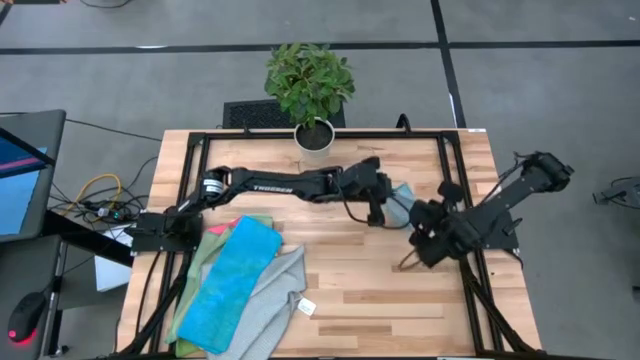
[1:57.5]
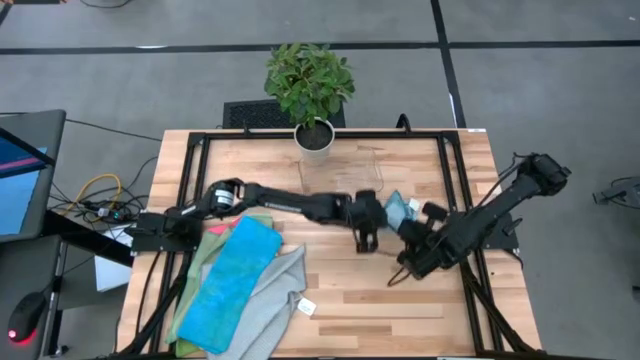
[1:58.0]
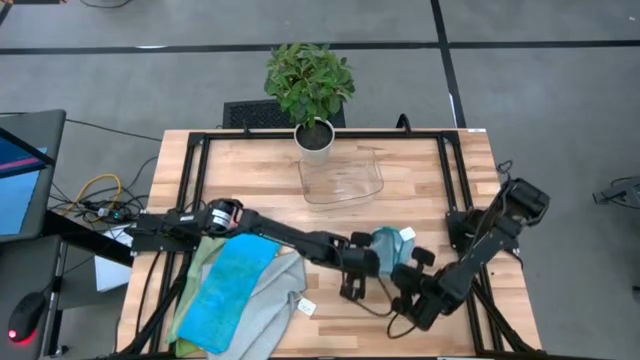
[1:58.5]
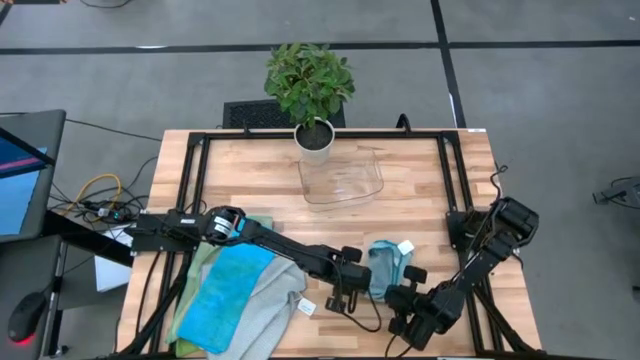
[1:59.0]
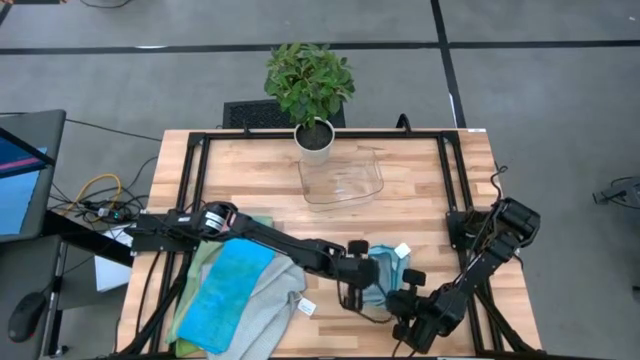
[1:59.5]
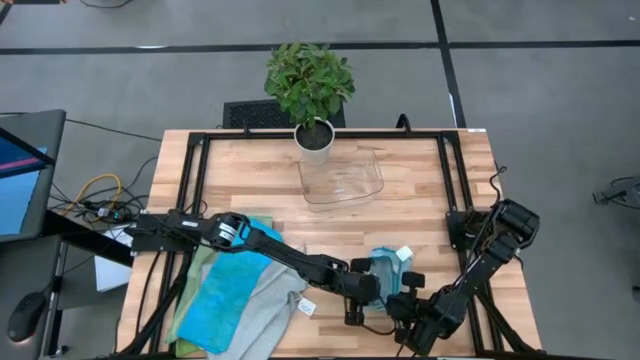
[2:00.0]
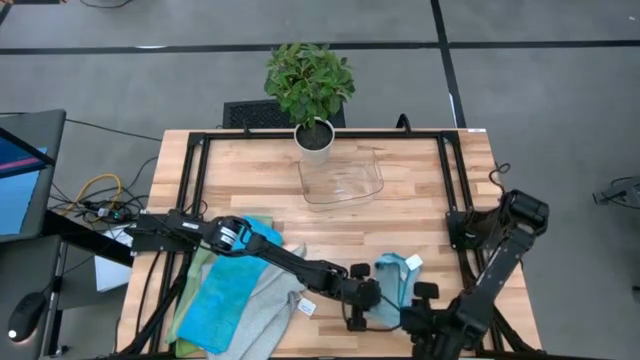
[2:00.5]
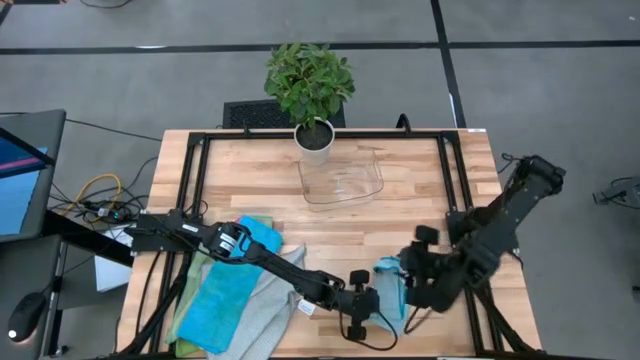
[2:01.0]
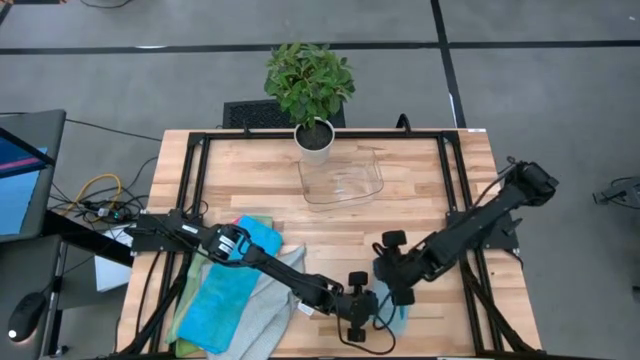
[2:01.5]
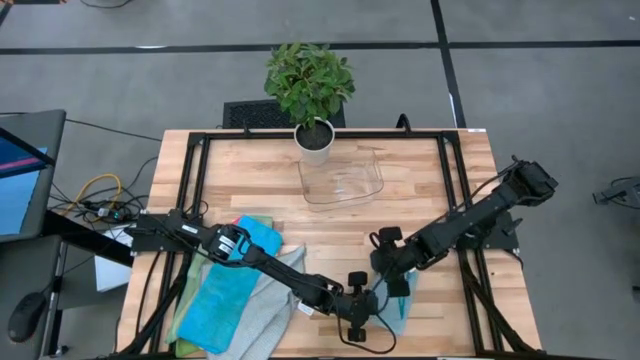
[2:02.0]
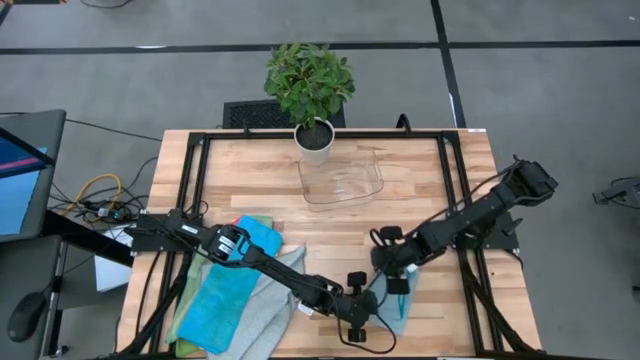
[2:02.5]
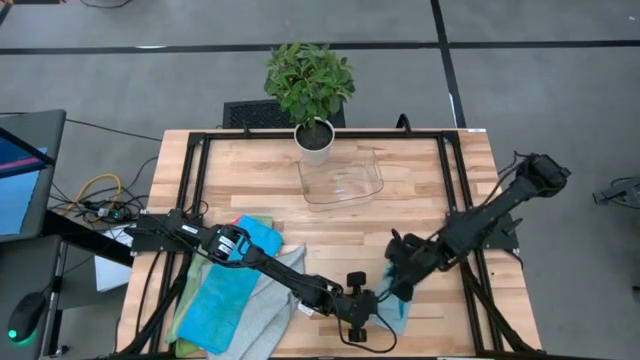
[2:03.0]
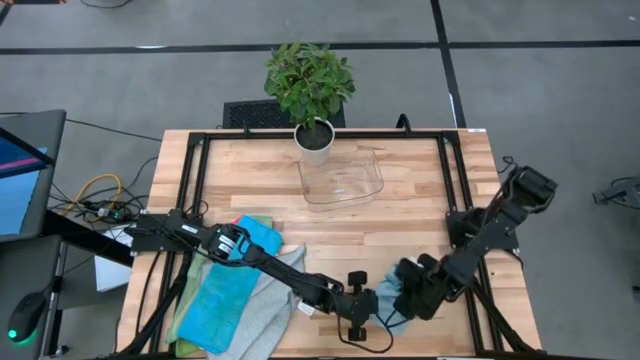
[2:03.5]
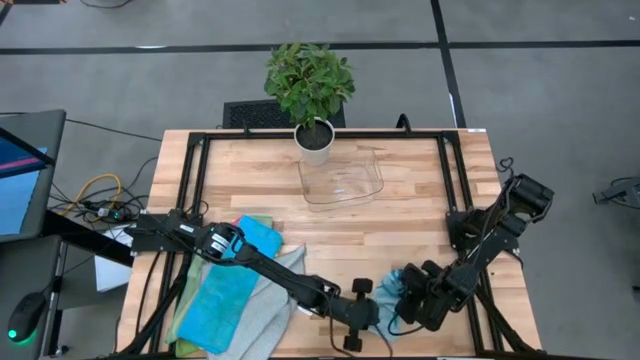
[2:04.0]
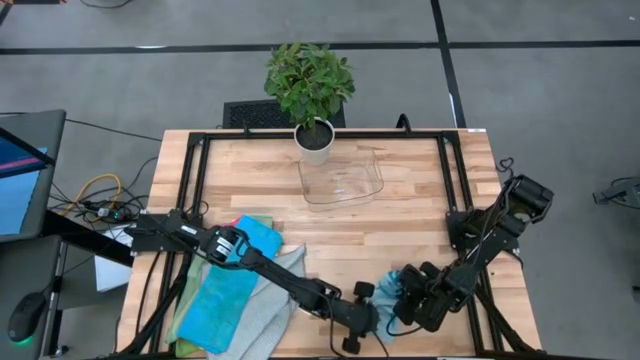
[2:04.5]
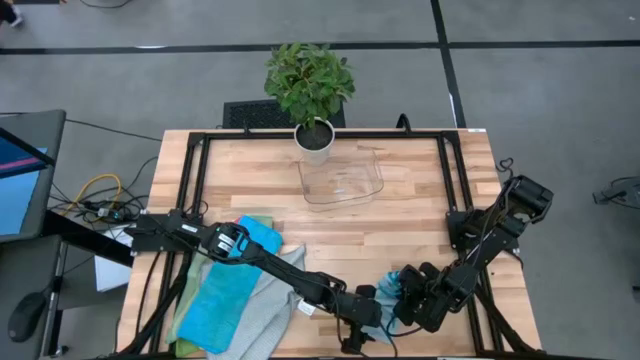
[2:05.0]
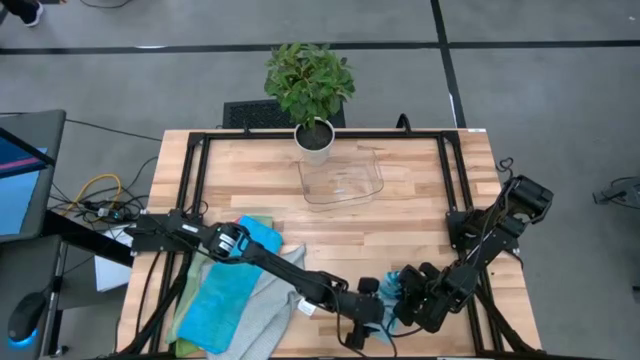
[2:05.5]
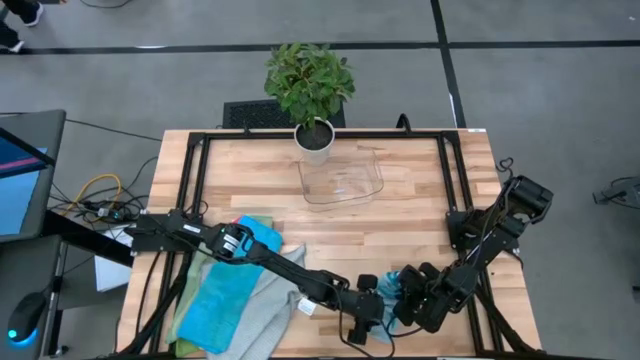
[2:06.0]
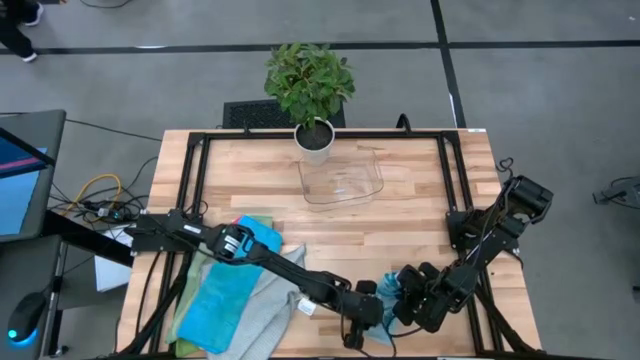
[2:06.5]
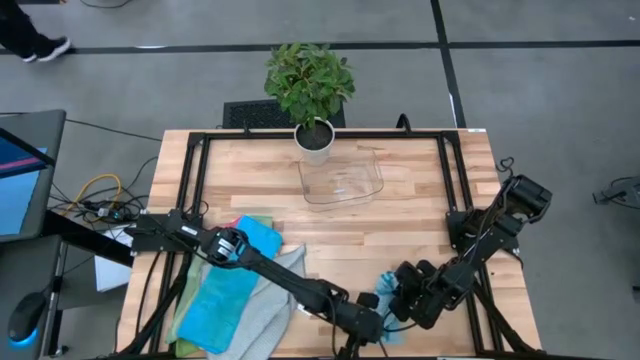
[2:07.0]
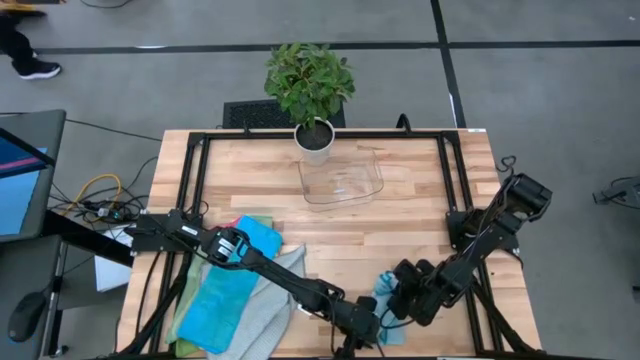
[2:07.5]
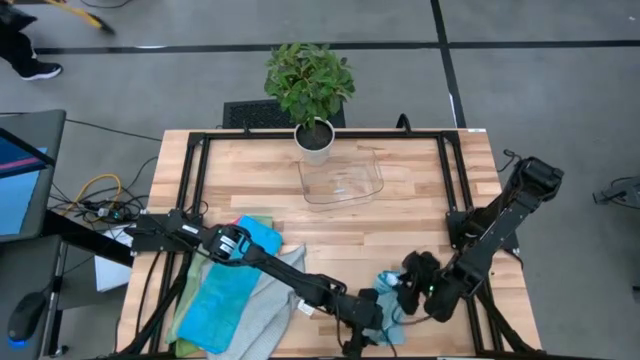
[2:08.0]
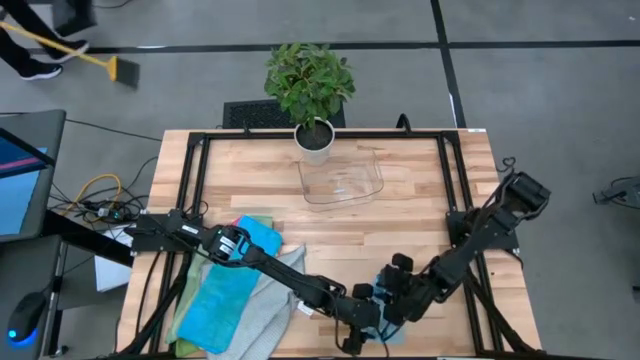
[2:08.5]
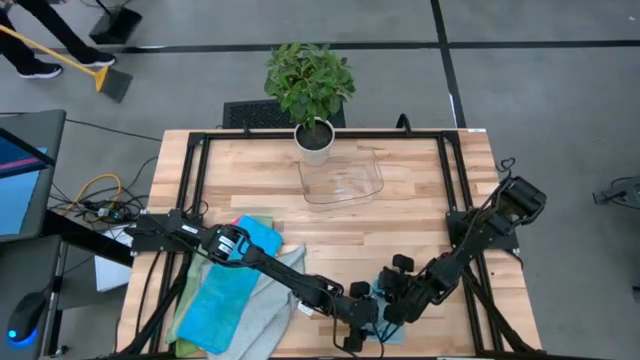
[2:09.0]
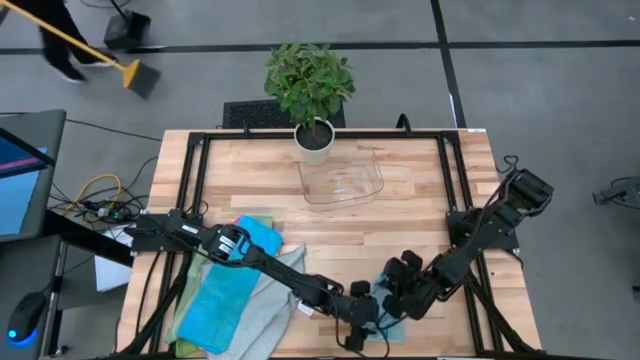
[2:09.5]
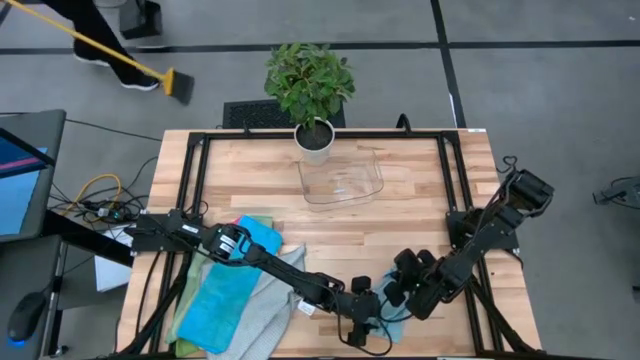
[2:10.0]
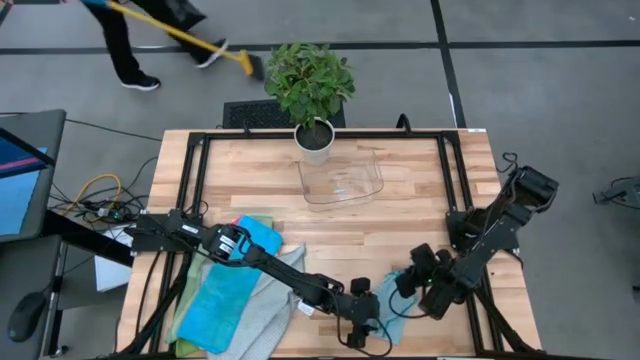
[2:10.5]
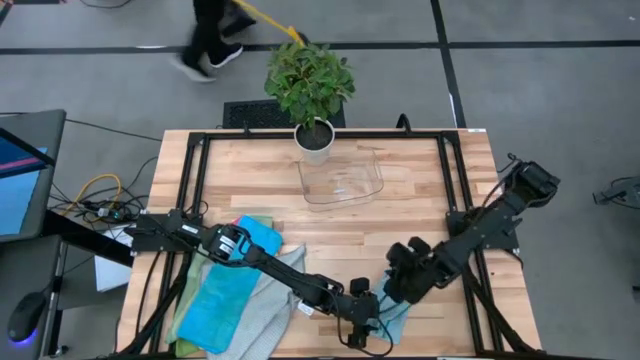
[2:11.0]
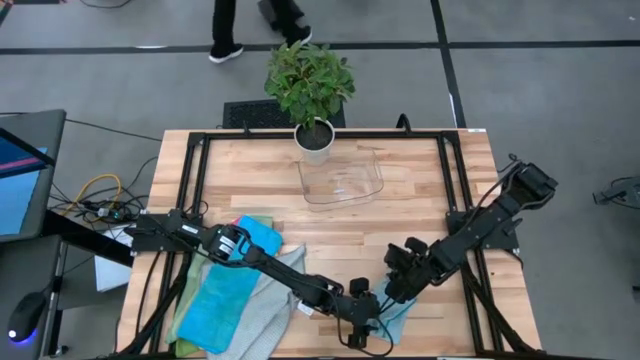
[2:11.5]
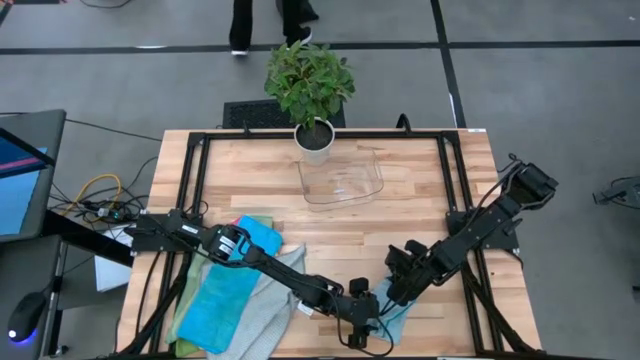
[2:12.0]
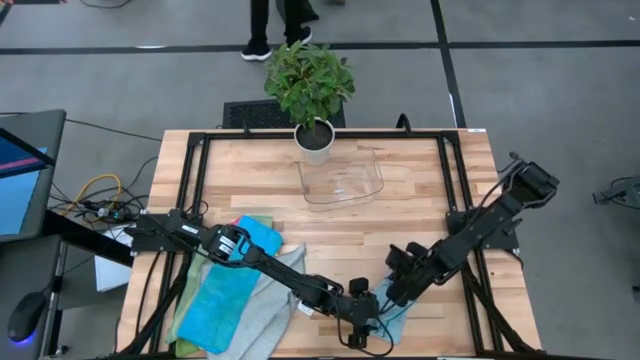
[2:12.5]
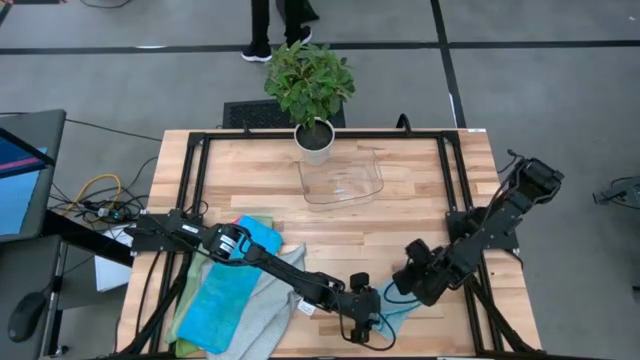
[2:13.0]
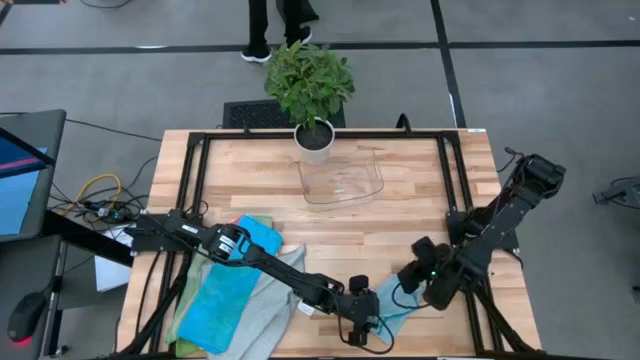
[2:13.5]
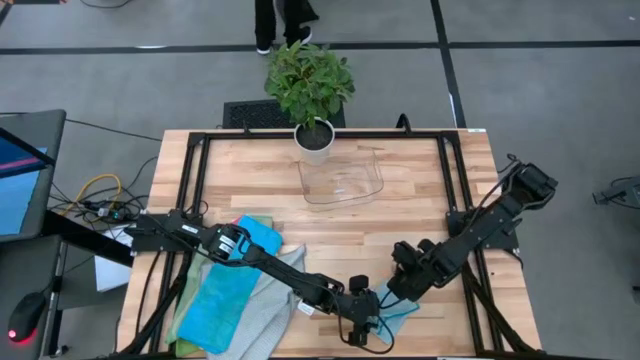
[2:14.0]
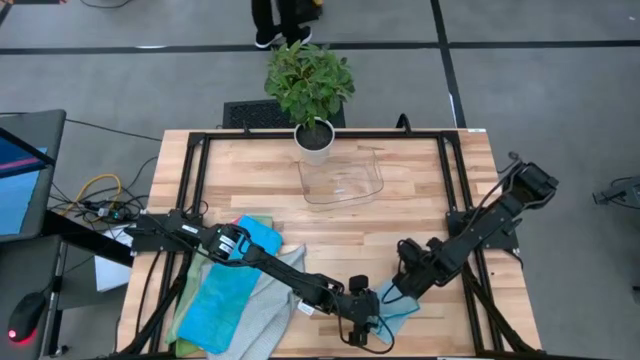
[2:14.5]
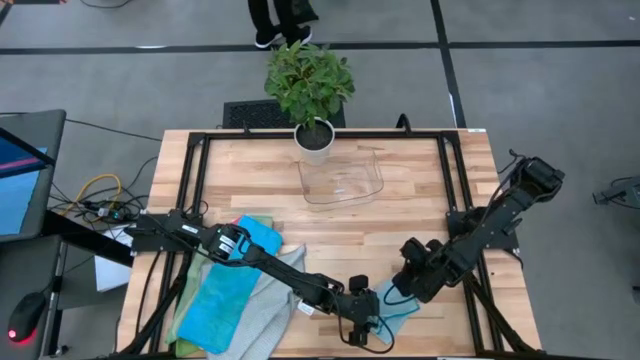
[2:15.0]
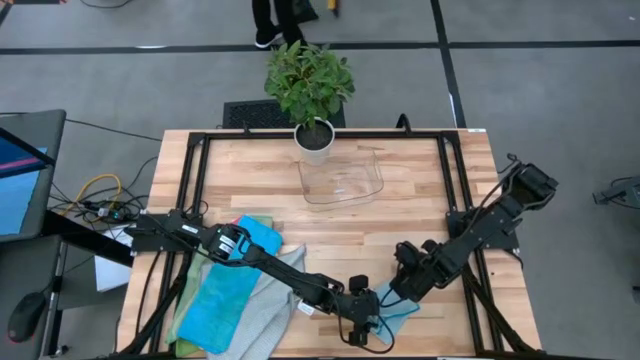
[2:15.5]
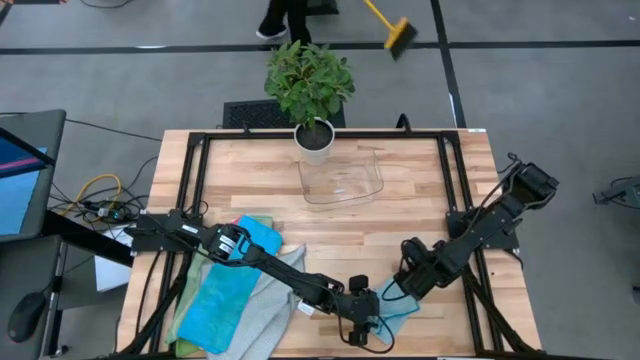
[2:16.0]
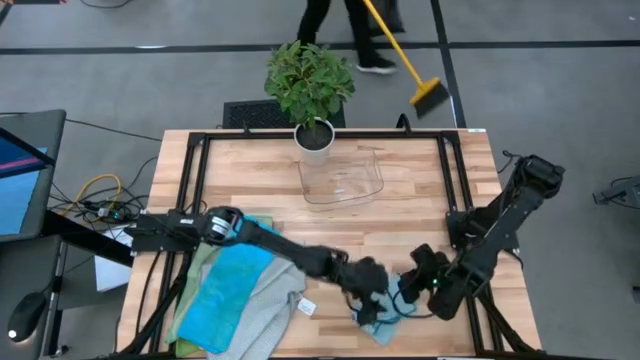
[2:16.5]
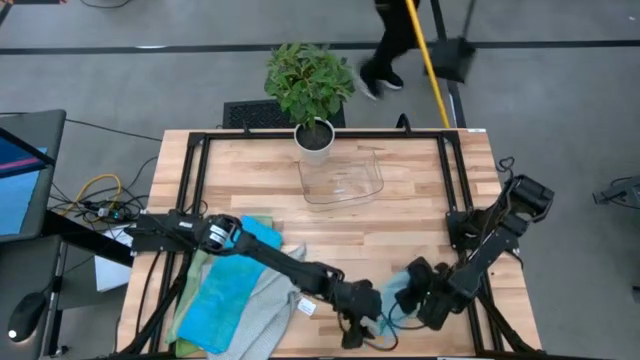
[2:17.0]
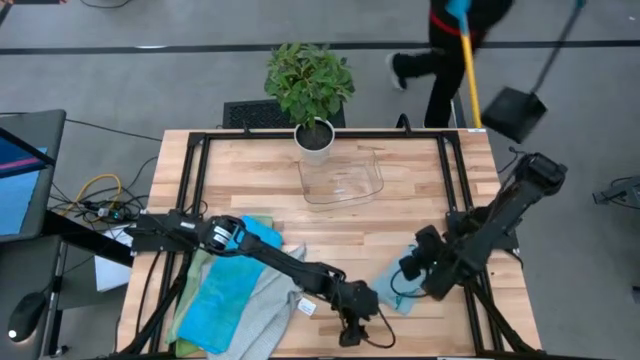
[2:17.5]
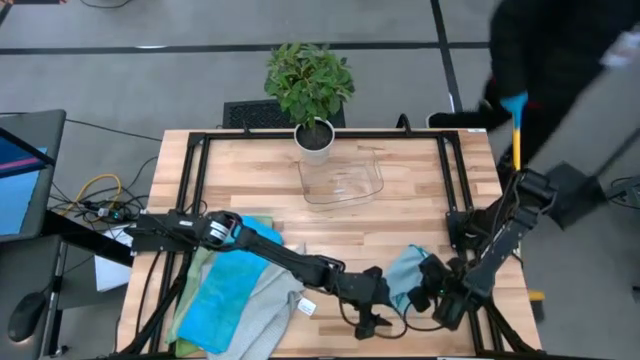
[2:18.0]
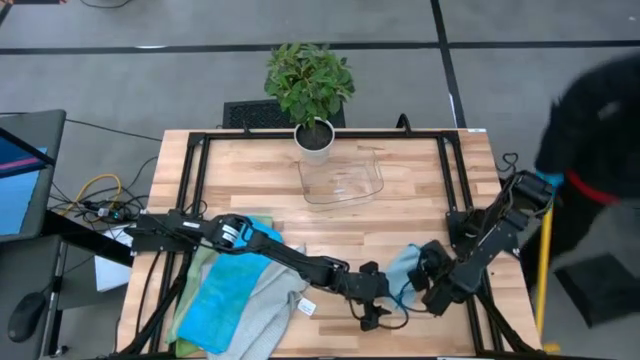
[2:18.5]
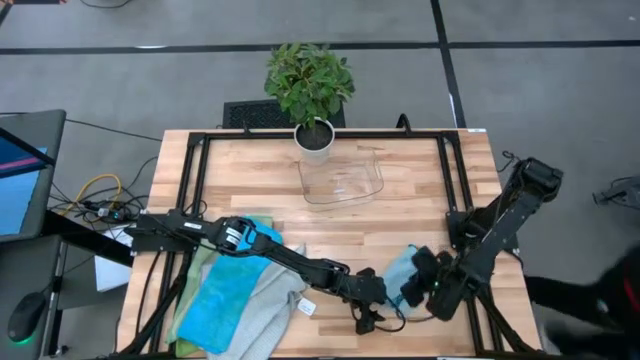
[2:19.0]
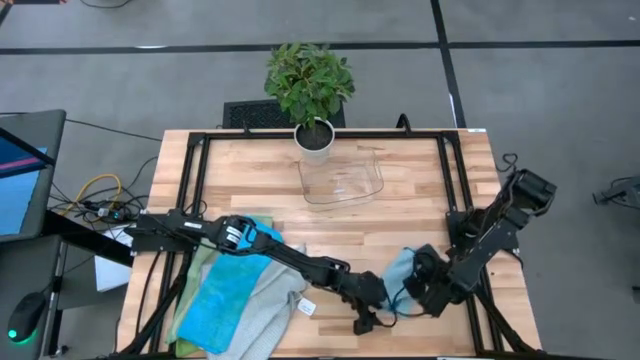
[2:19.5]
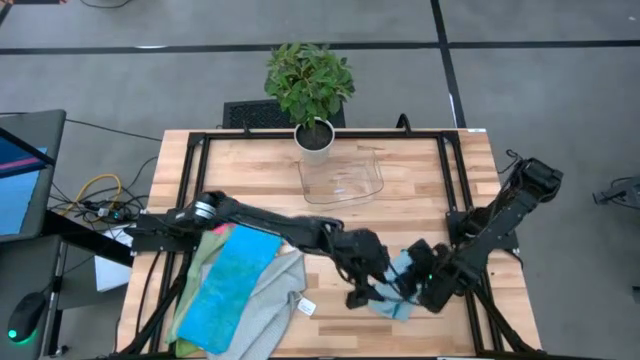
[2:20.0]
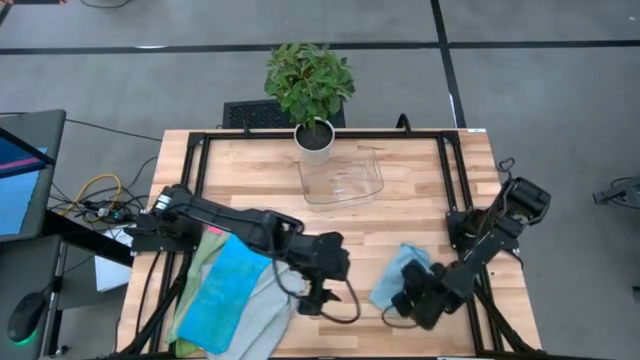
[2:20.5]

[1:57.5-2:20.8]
Task: Fold microfiber towels
Fold the light blue microfiber cloth
